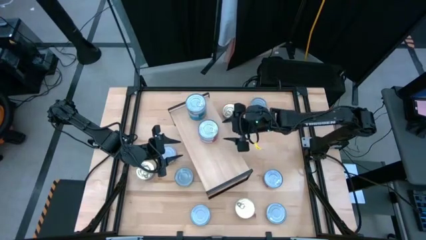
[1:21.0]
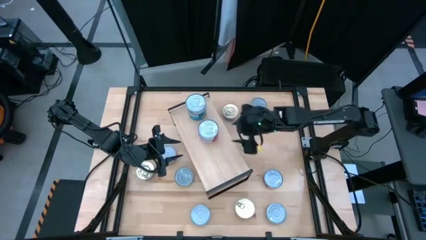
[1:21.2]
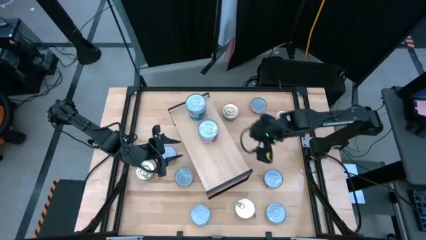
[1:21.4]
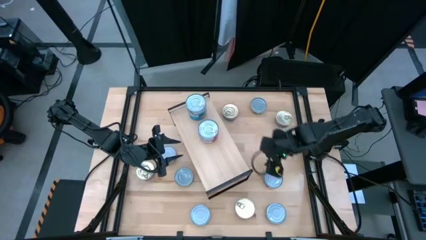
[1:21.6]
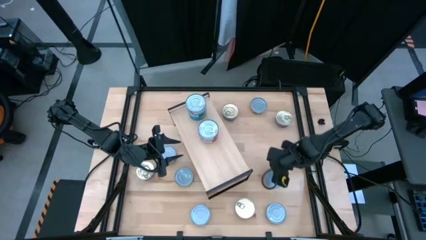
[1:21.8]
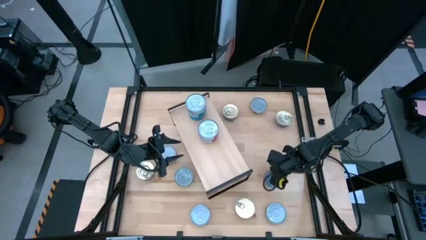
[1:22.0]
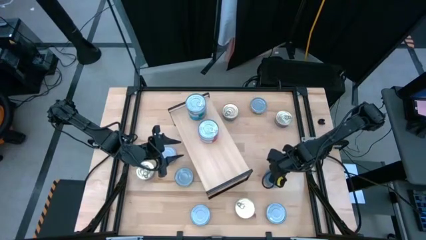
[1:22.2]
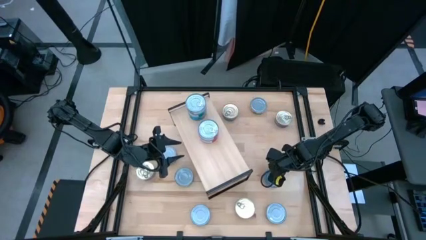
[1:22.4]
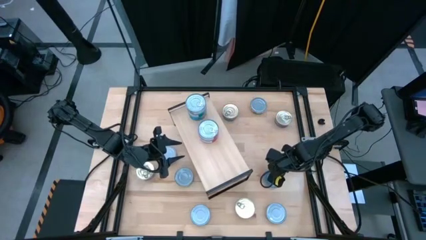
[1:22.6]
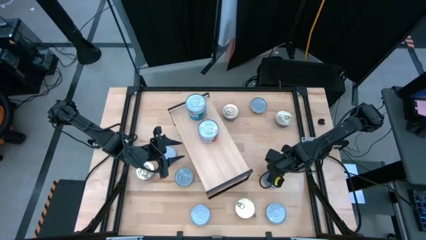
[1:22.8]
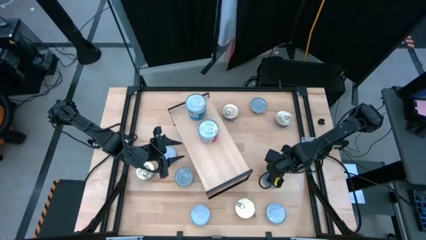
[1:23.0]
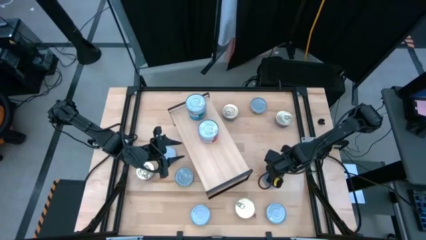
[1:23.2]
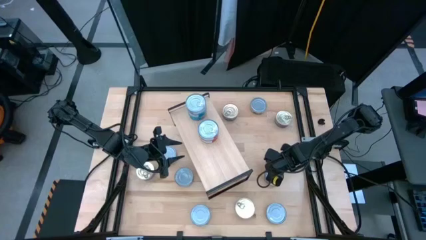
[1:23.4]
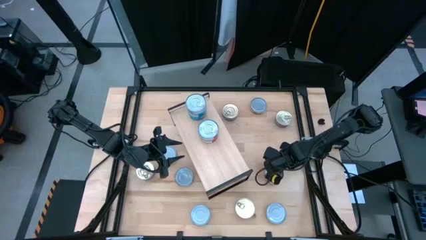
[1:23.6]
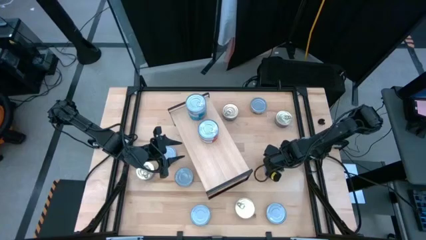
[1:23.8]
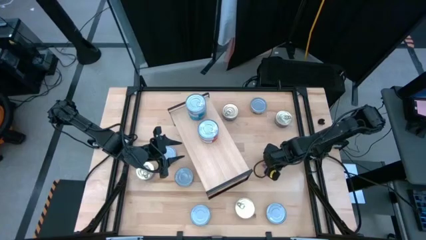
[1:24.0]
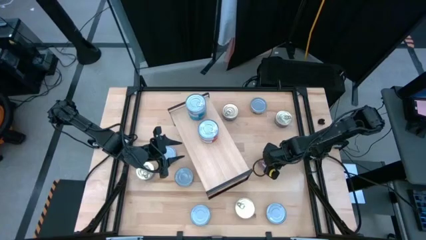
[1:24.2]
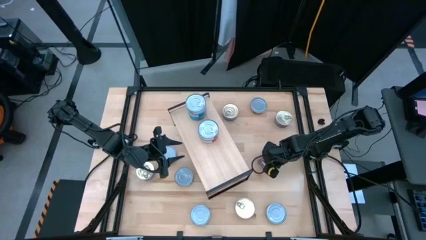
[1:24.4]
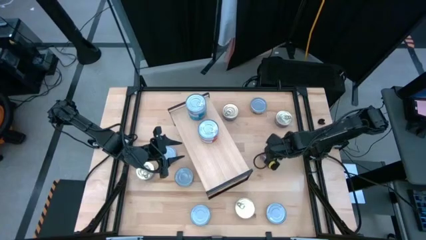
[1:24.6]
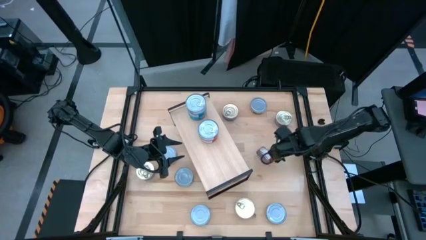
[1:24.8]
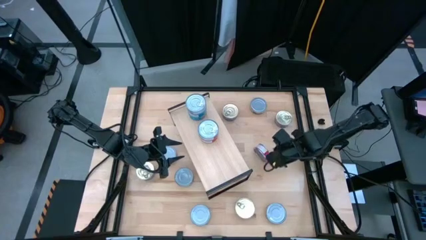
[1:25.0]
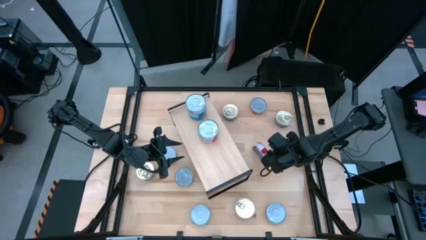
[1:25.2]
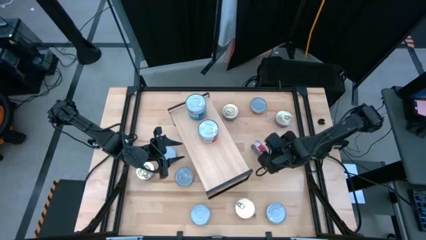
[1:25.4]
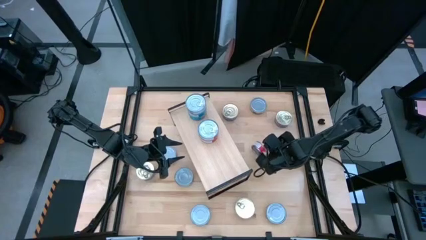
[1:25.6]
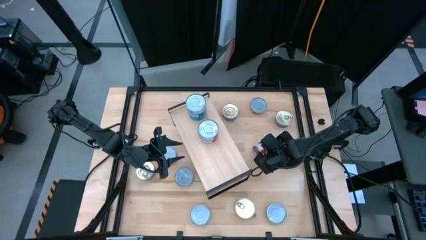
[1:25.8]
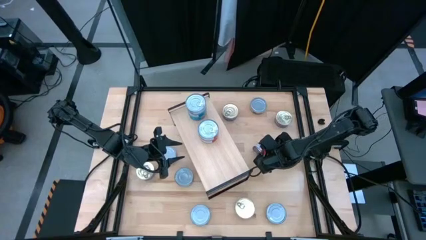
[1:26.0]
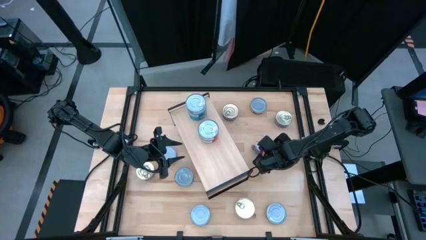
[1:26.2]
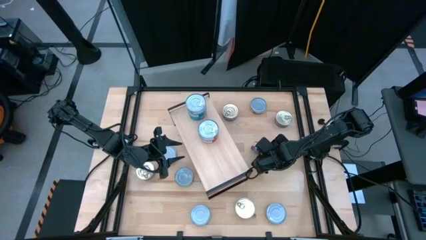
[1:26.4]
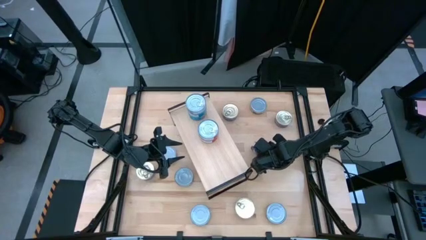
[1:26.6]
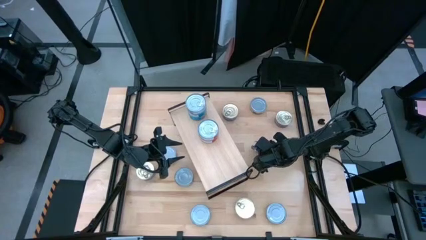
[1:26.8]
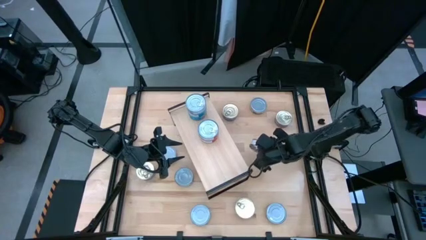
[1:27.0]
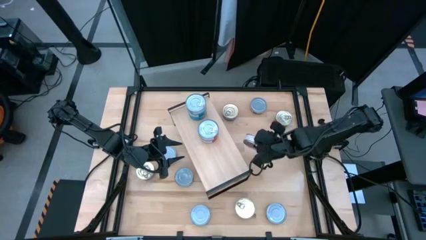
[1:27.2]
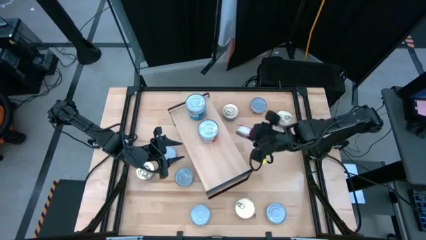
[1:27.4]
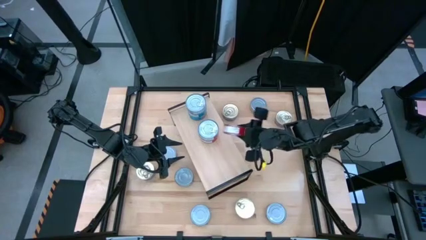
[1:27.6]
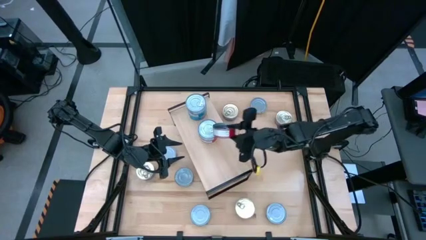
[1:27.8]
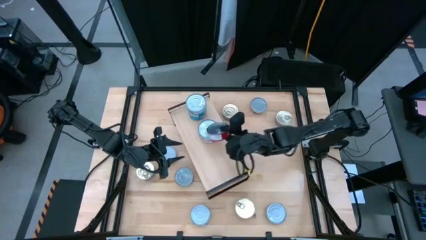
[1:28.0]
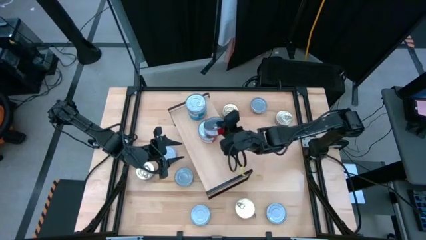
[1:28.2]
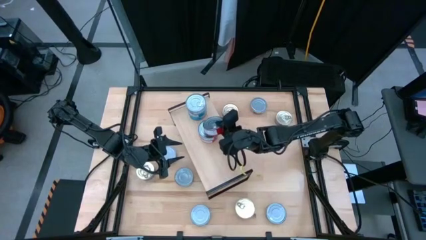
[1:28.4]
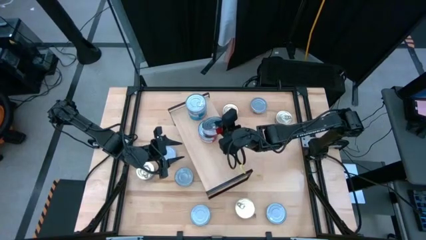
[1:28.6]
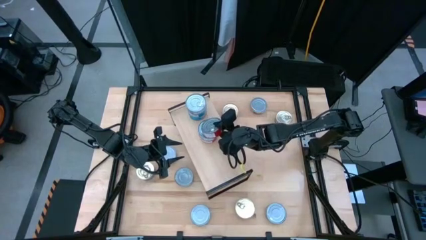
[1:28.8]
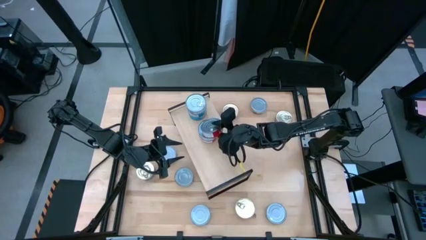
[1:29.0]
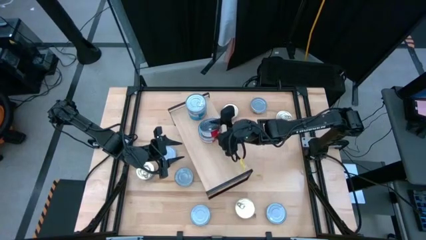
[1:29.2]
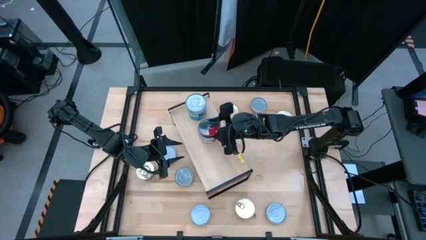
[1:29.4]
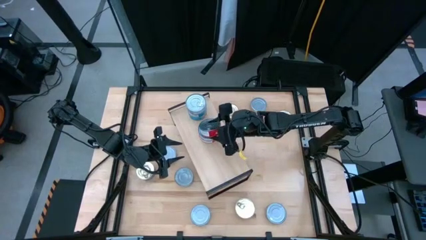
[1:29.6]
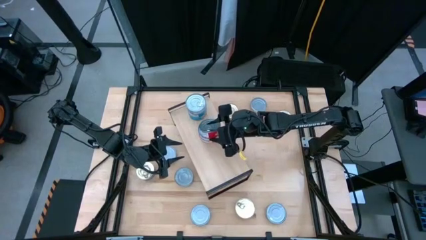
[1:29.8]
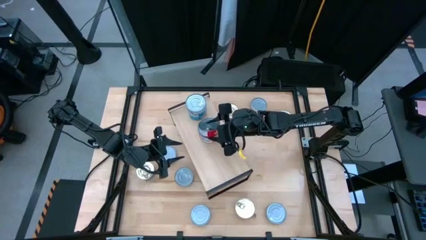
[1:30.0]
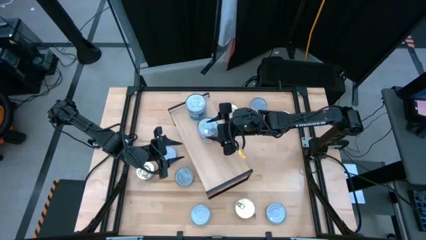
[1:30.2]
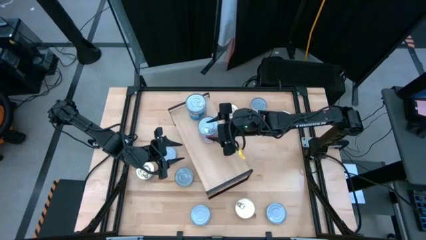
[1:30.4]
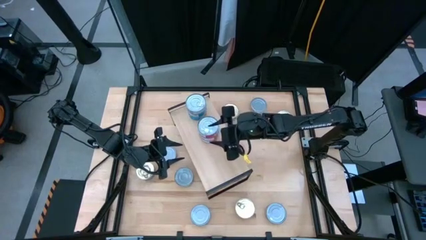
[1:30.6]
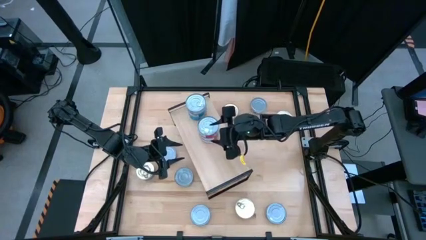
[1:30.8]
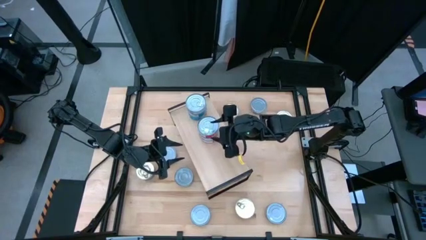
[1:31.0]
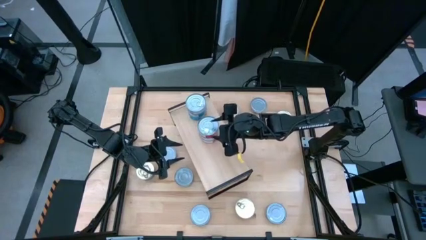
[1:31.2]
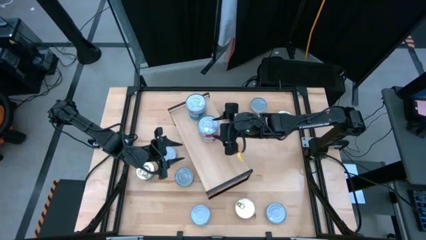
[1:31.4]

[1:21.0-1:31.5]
Task: Stack canned seafood by type on shelf
Stack the red tuna can on top of the red tuna cans on the shelf

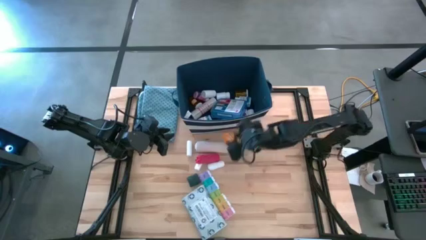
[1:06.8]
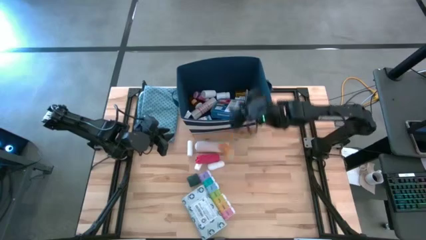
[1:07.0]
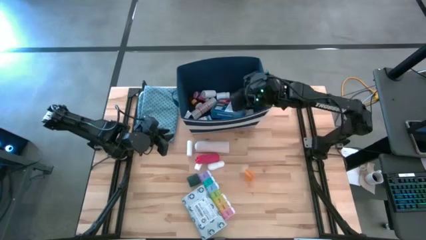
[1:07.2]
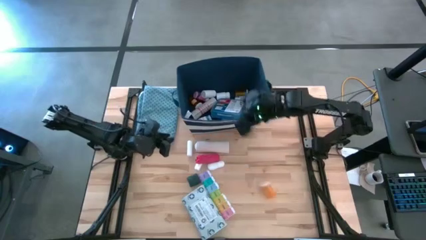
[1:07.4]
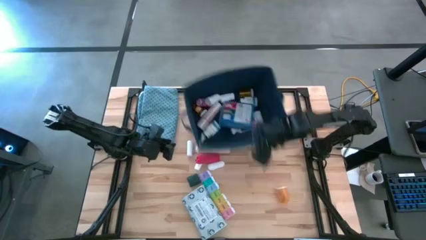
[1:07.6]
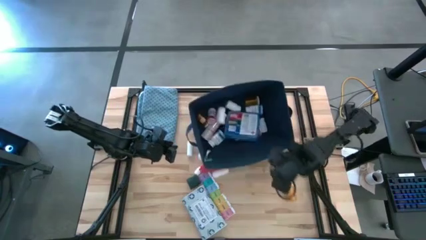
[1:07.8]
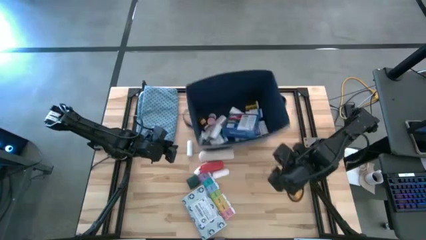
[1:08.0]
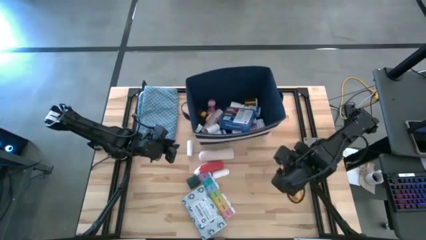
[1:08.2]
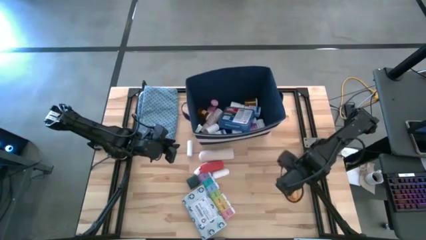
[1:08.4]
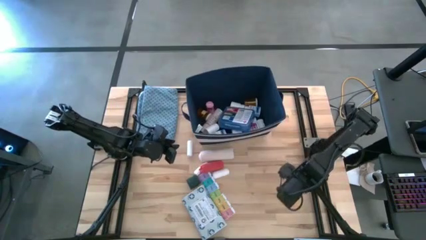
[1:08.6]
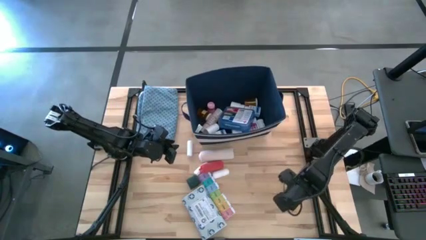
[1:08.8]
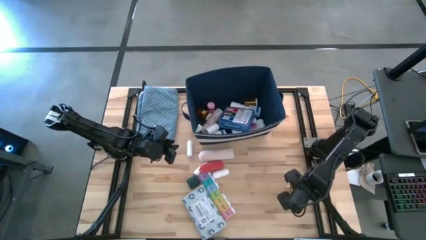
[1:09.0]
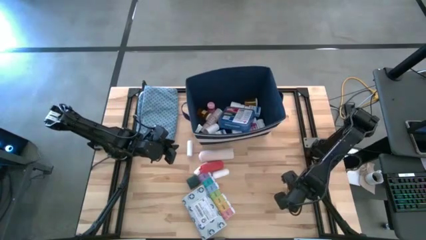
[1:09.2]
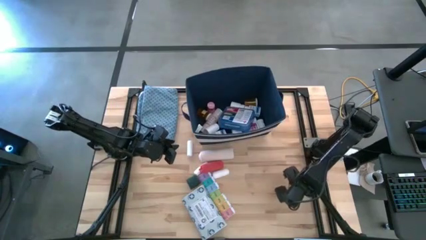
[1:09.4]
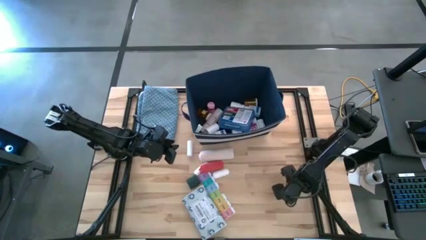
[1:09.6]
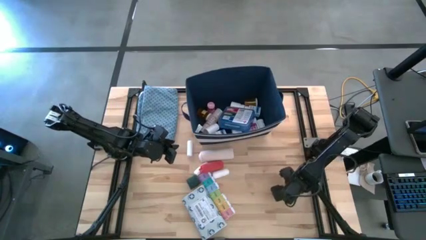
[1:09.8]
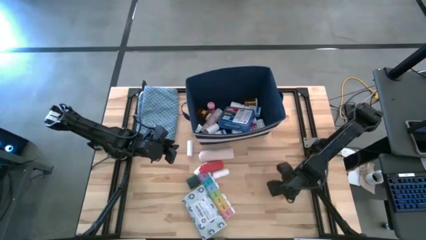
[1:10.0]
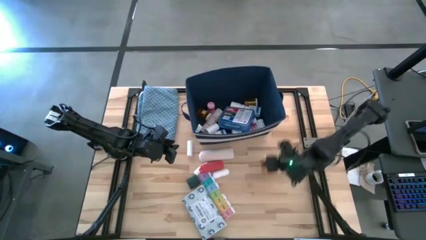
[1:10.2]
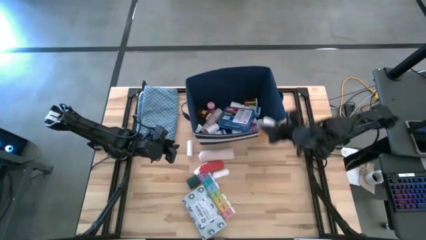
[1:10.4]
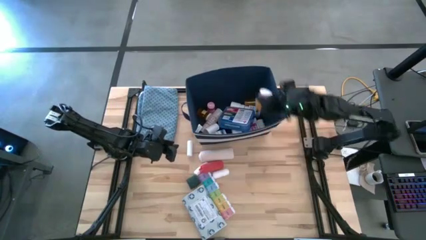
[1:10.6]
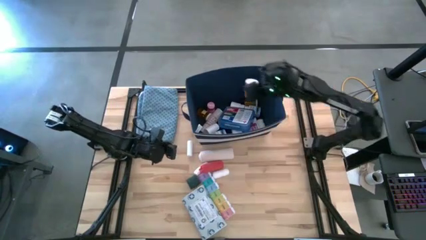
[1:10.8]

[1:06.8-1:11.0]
Task: Pick & place medical supplies in basket/bin
Put the orange pill bottle into the blue bin

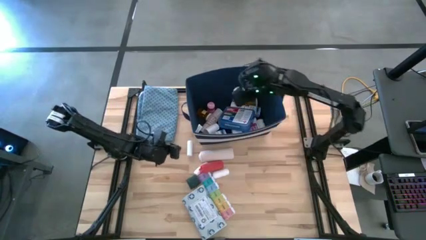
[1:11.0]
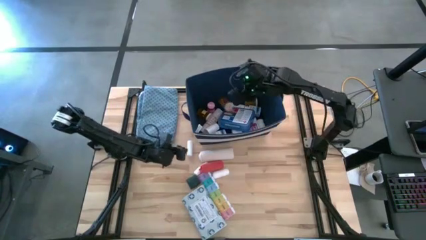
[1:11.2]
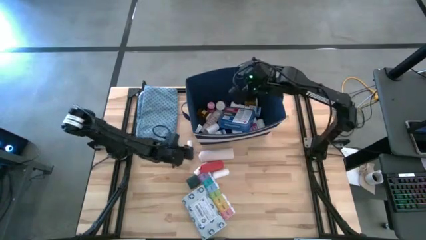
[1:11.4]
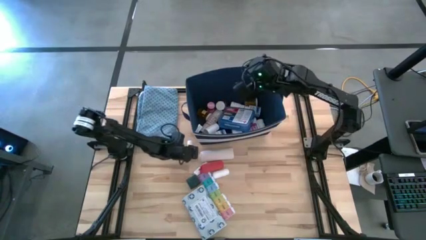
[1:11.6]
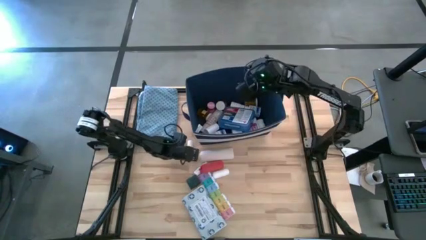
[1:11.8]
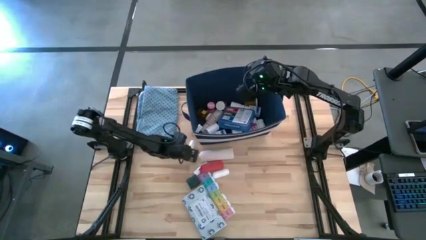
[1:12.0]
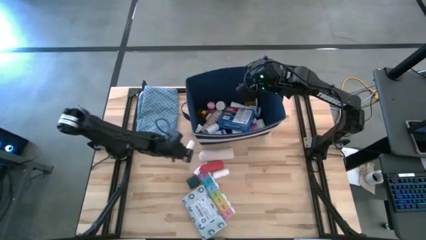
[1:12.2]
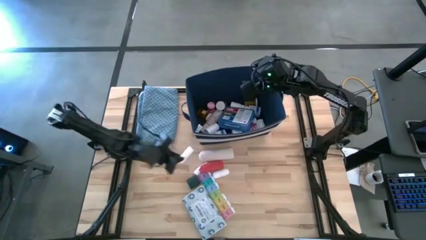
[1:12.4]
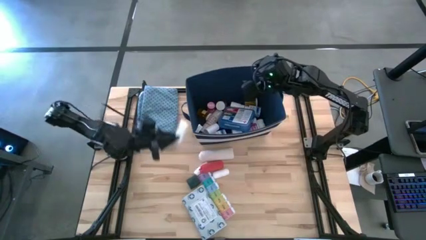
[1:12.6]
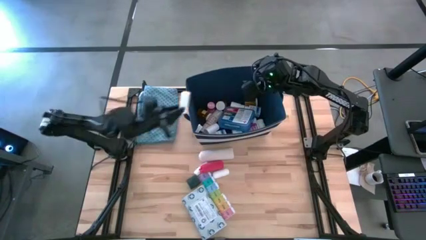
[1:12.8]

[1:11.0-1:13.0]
Put the white bandage into the blue bin
